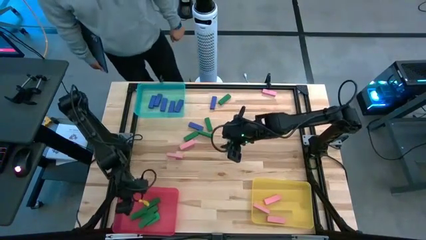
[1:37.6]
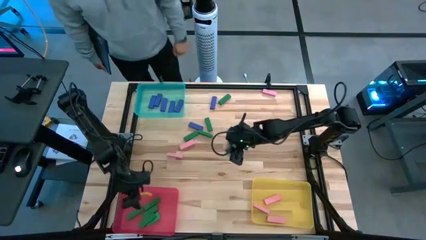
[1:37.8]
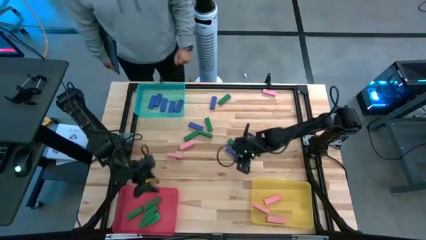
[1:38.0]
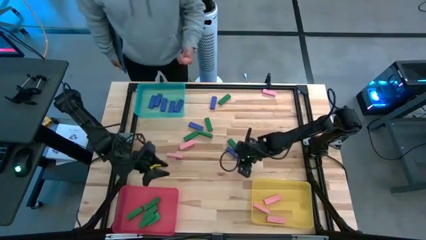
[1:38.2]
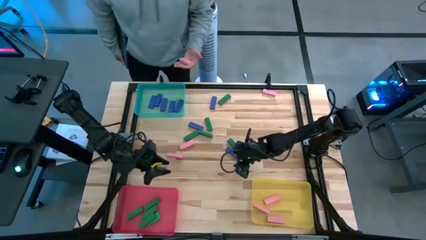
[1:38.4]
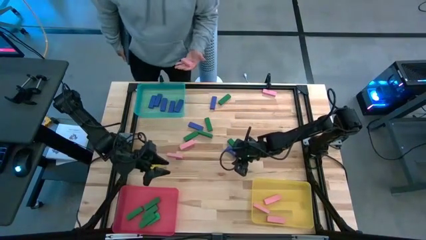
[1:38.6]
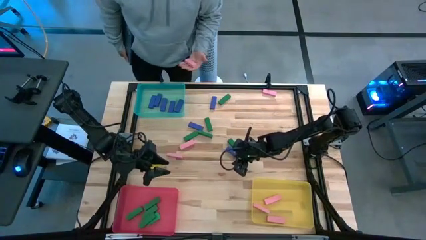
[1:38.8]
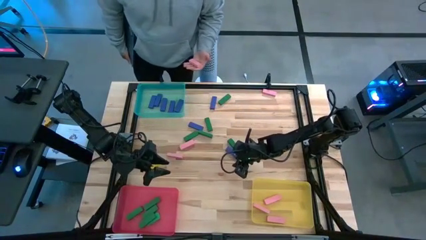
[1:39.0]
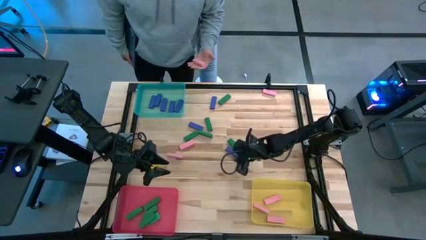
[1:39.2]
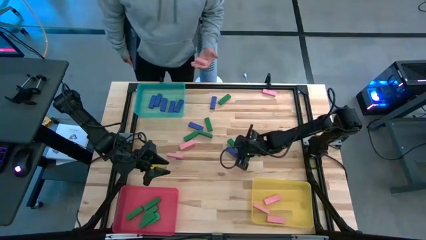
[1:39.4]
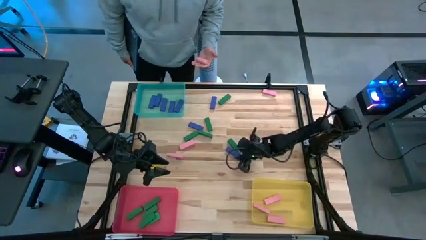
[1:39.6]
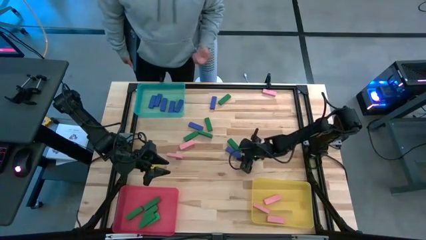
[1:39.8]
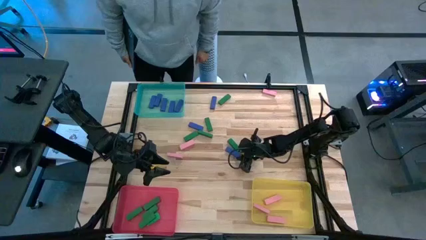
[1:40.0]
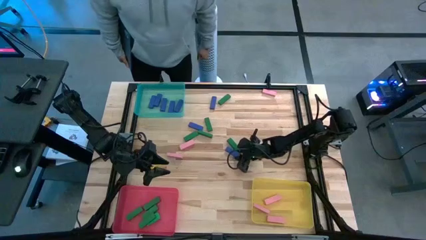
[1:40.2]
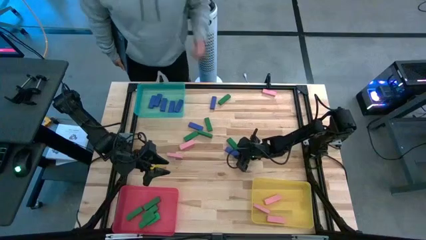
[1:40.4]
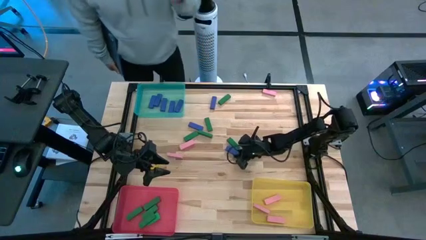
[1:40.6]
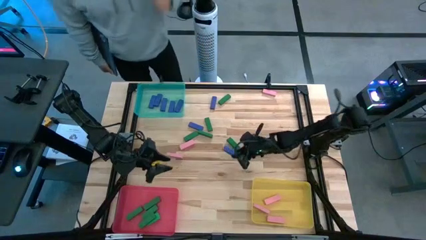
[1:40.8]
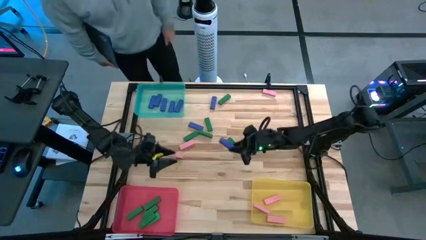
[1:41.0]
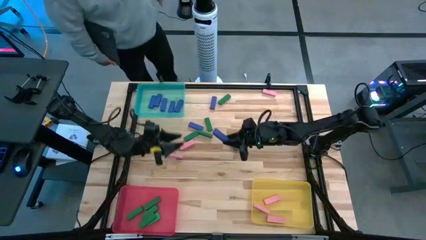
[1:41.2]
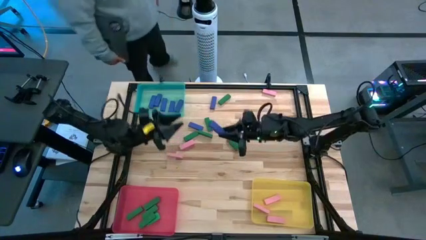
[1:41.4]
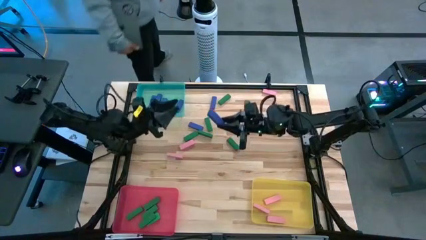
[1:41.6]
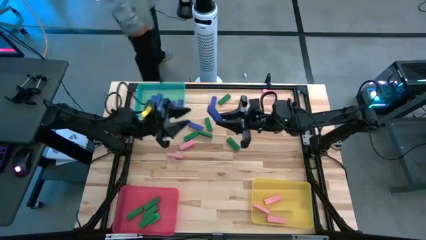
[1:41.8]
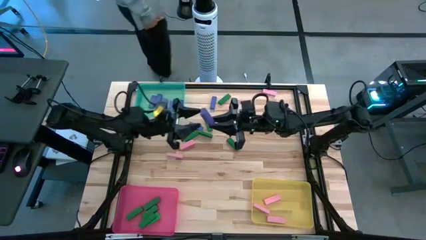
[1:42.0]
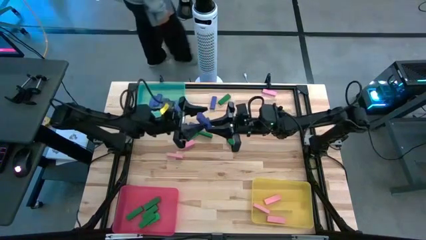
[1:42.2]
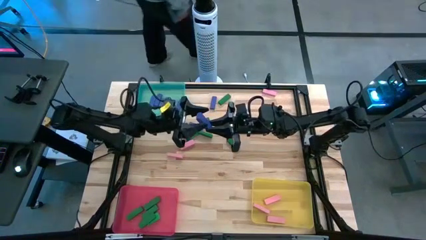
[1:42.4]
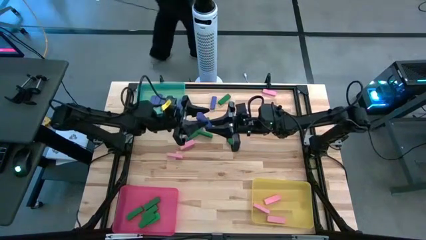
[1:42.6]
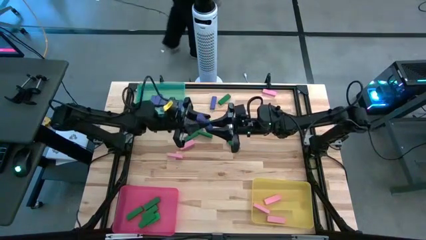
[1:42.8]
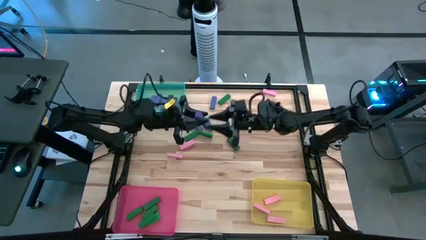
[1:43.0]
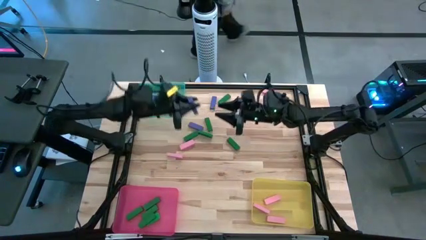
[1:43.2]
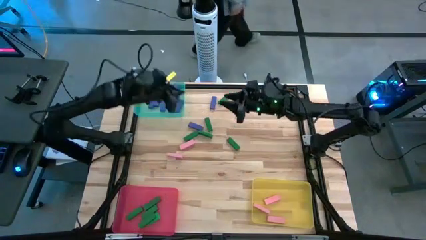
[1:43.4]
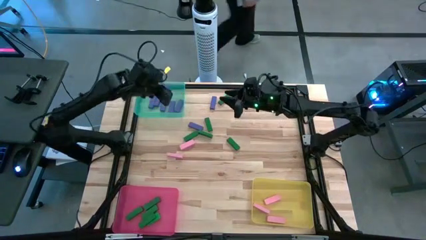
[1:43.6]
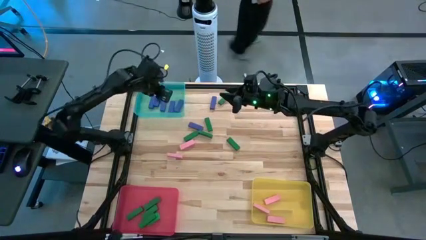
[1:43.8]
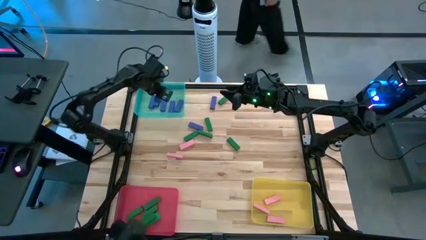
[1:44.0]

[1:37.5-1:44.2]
Task: Sort blocks
Put the blue block into the blue bin

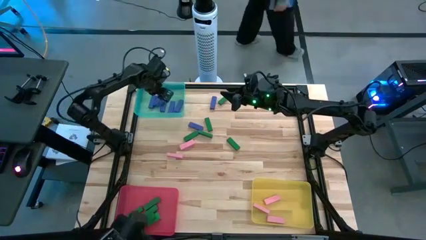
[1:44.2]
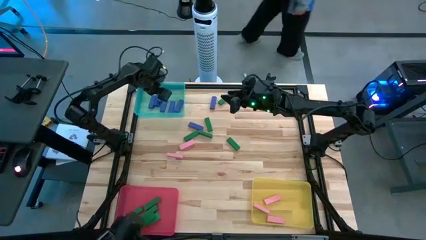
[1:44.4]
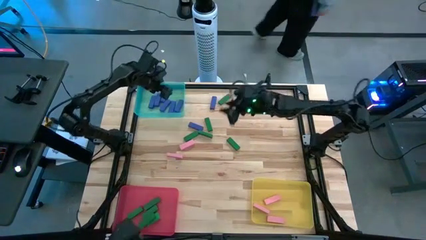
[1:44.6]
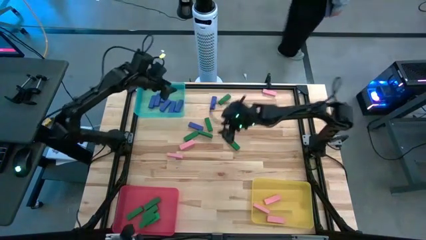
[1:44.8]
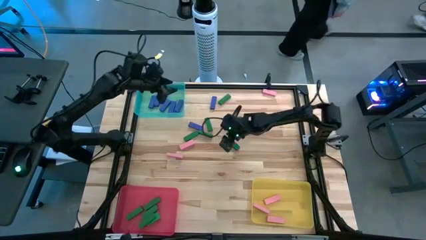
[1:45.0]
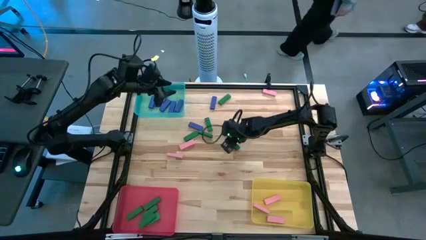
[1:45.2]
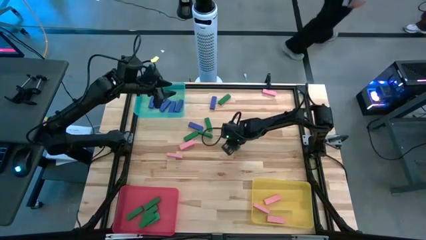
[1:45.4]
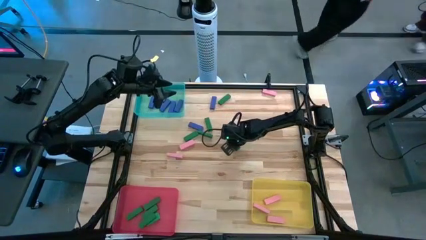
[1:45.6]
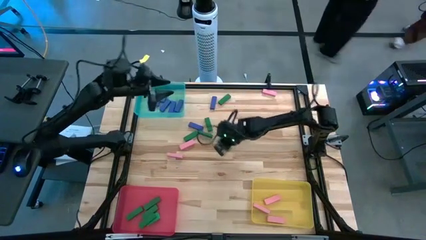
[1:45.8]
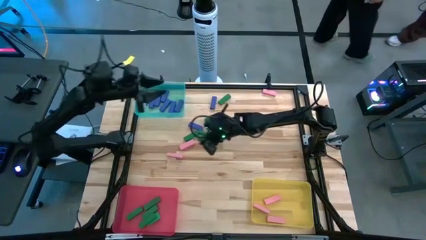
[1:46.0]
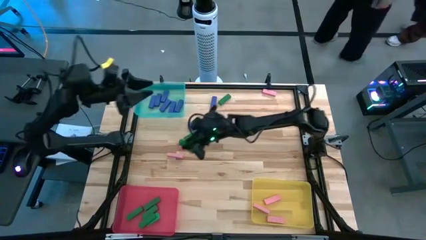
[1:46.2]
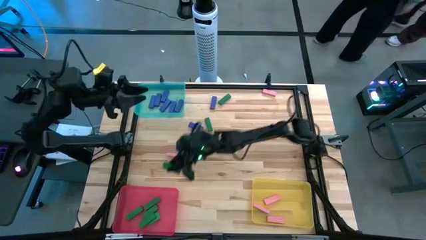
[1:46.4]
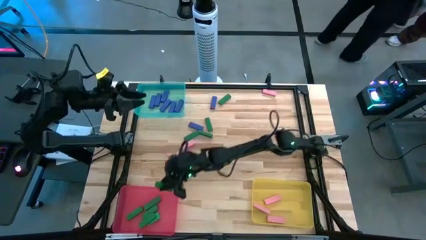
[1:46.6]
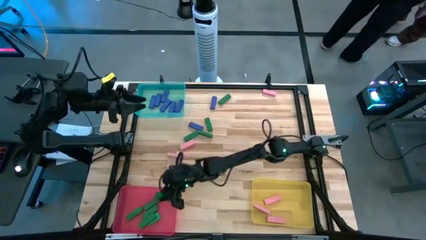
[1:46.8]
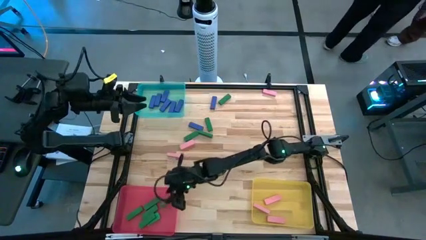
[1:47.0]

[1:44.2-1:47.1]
Put the green block into the red bin

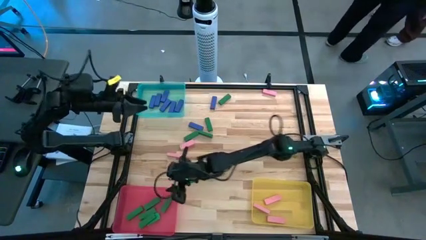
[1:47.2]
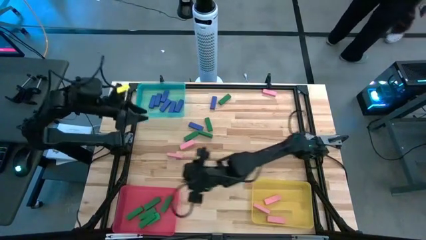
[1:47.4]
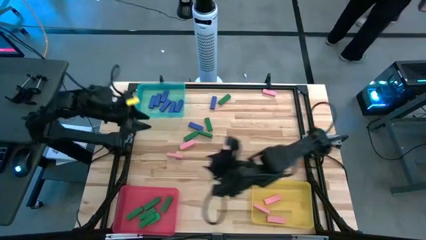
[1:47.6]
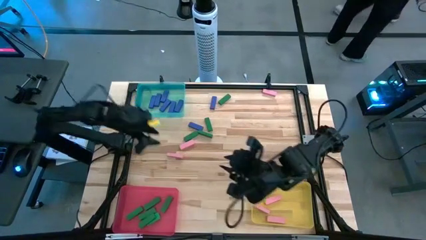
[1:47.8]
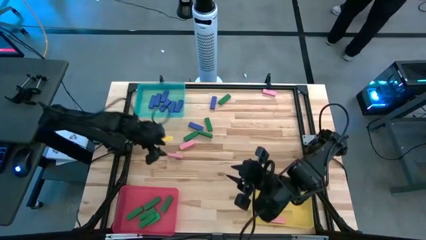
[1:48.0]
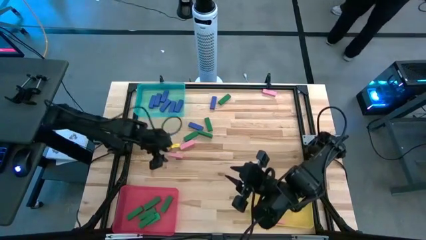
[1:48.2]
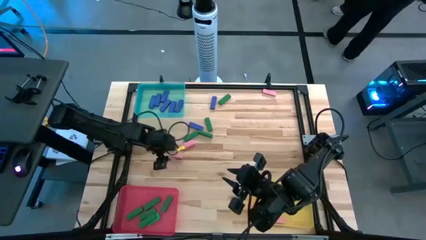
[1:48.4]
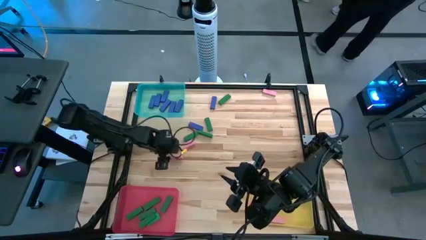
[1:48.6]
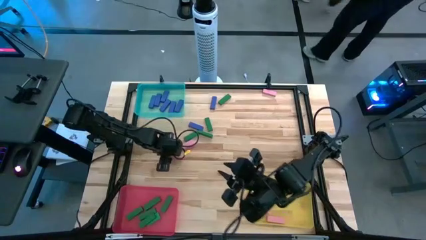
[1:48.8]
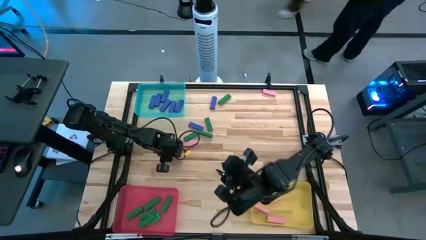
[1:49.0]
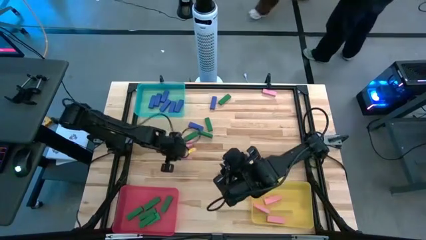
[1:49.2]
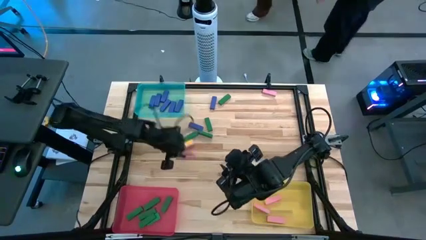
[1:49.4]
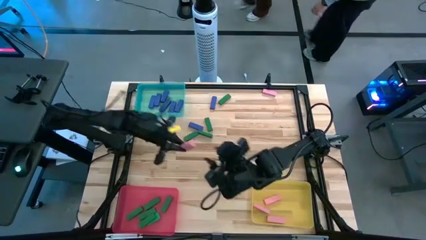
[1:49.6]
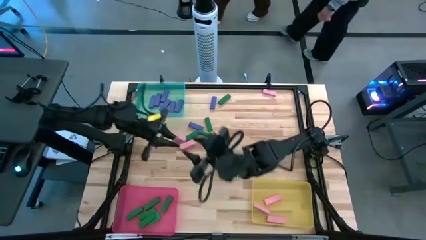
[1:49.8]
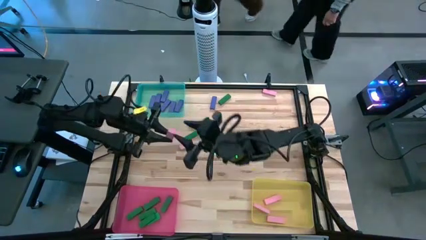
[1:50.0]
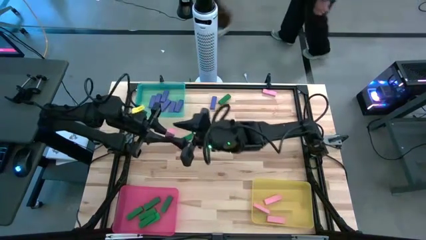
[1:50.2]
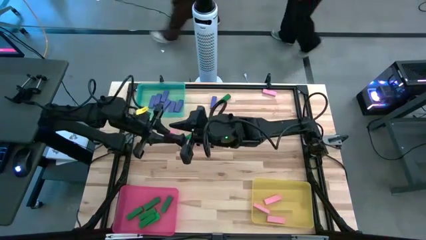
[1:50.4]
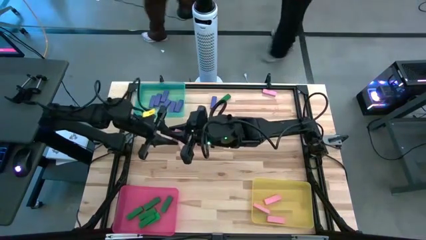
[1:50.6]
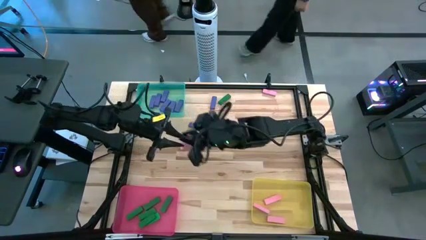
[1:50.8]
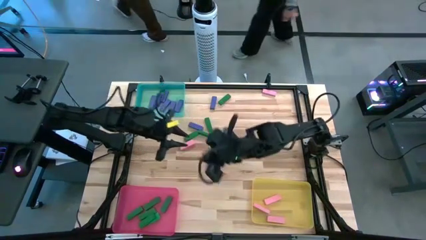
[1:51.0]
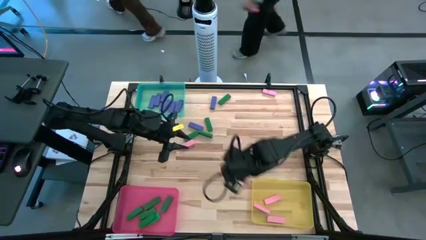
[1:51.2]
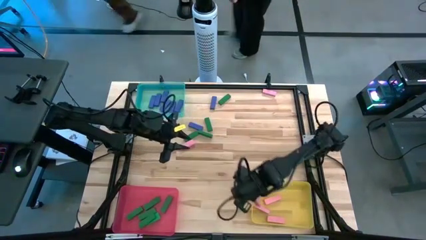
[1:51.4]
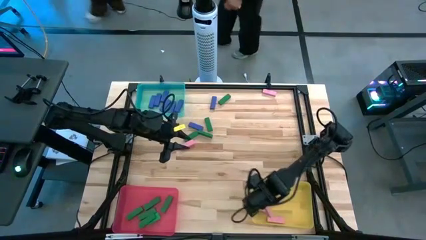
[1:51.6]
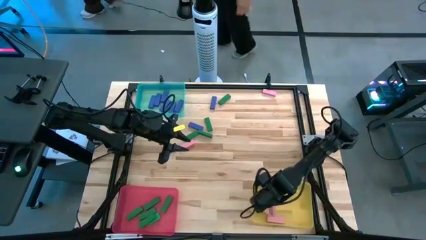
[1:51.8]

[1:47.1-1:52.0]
Put the pink block into the yellow bin

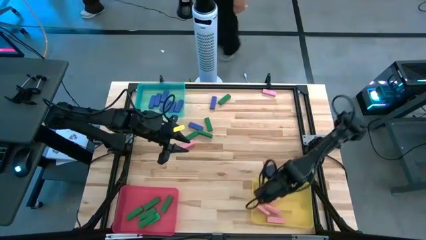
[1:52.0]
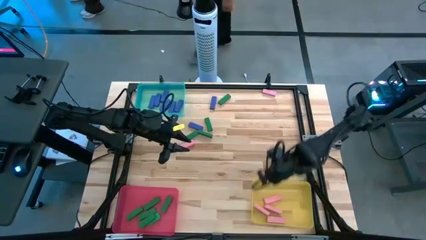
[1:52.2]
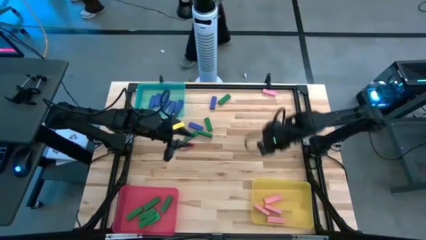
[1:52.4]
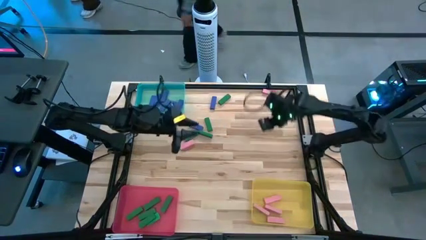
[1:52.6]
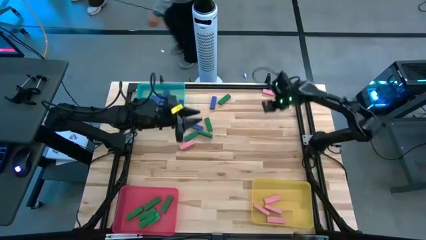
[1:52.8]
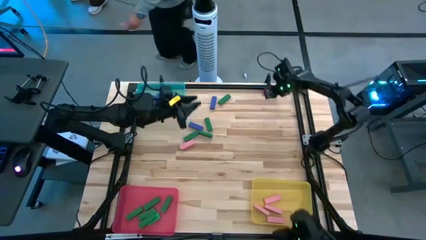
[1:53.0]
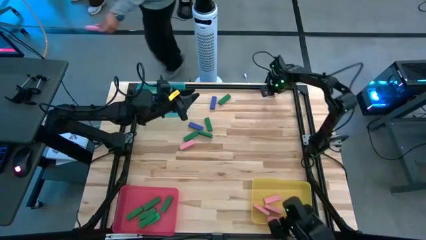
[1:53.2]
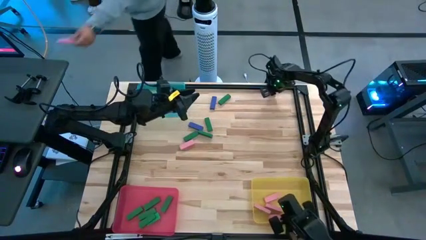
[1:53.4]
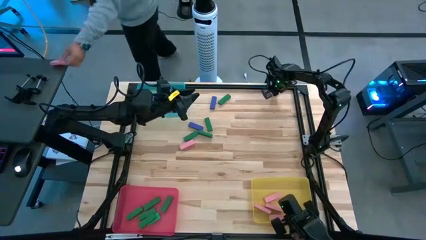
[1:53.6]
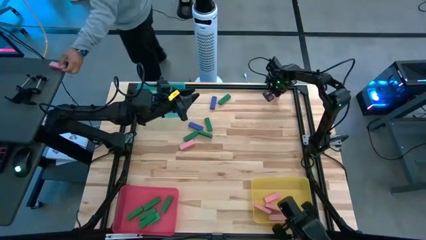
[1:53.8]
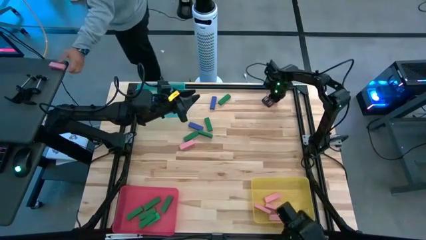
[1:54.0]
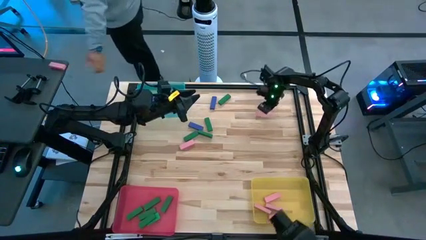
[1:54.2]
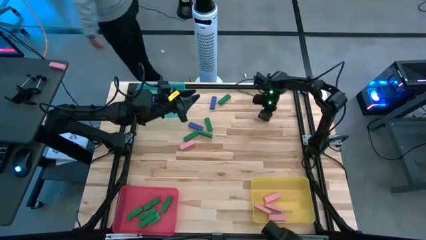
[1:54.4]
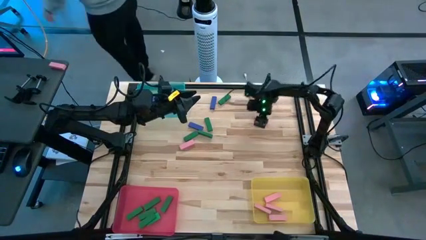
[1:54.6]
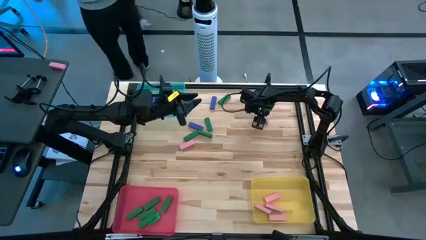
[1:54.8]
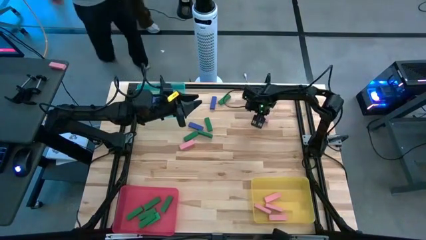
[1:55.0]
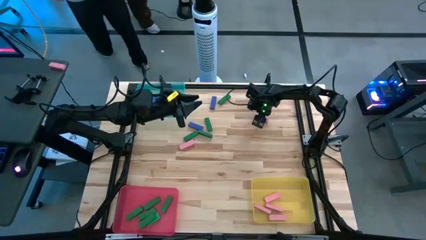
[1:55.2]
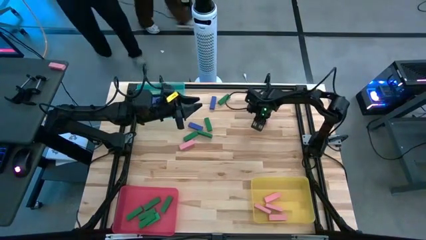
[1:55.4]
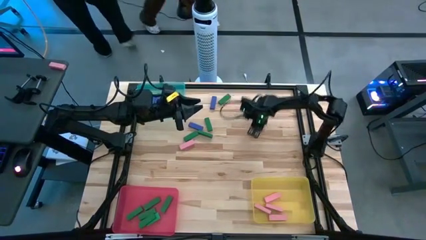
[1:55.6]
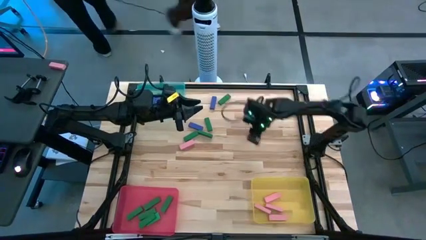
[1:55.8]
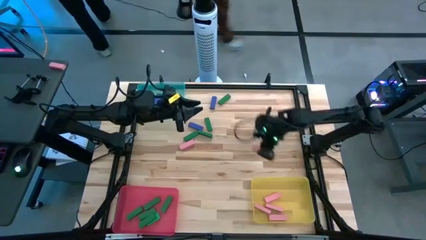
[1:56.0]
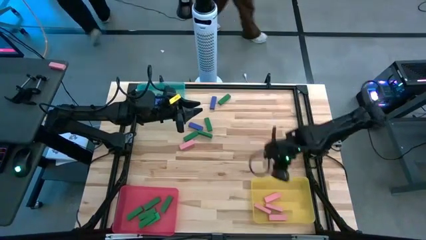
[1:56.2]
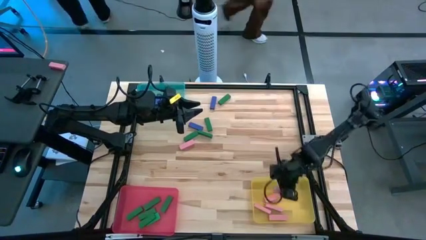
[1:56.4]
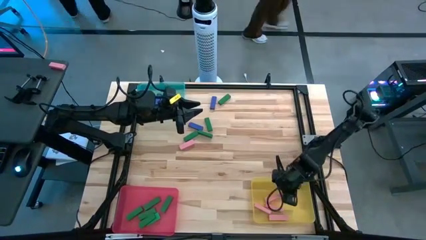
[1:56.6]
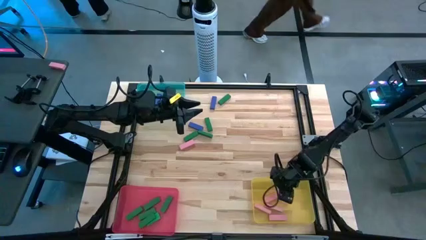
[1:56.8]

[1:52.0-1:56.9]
Put the pink block into the yellow bin
